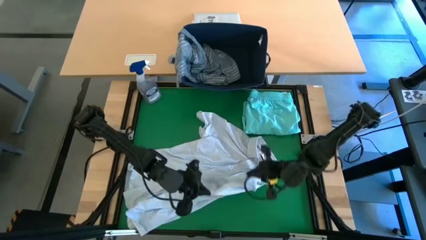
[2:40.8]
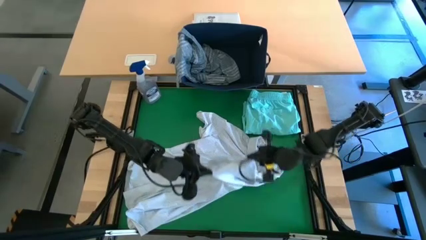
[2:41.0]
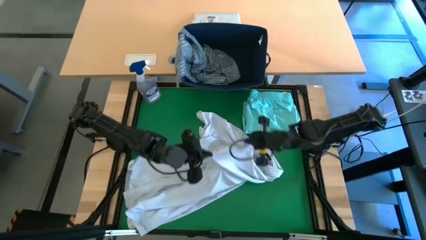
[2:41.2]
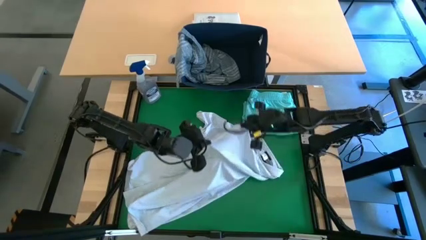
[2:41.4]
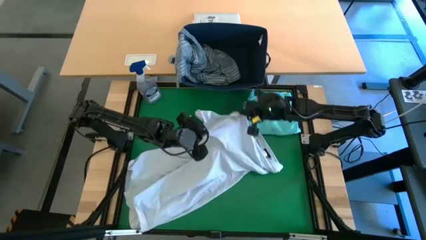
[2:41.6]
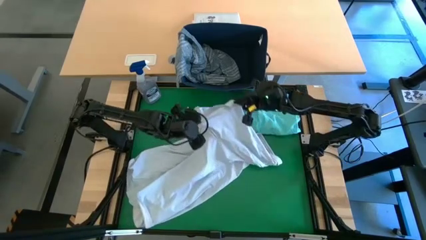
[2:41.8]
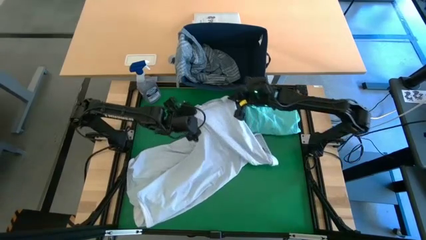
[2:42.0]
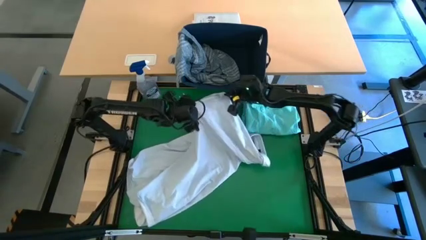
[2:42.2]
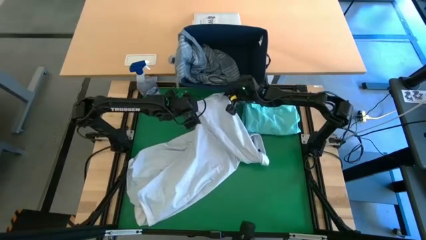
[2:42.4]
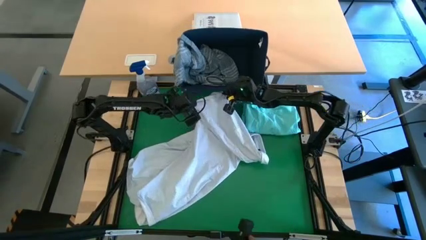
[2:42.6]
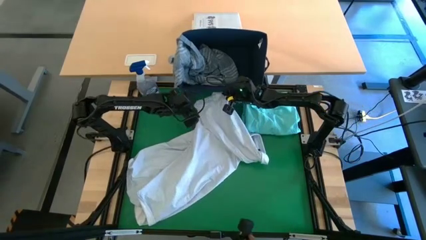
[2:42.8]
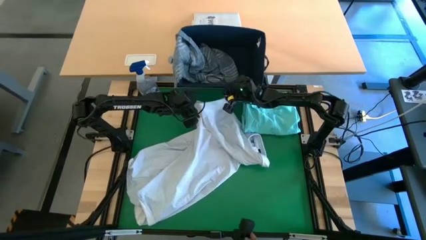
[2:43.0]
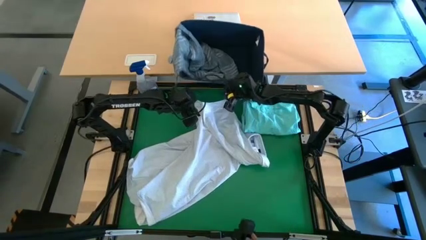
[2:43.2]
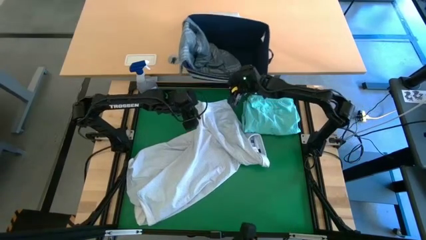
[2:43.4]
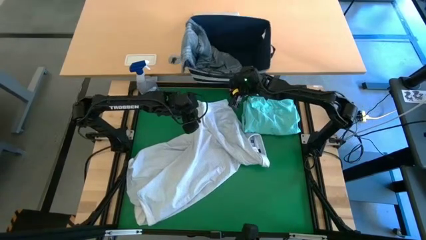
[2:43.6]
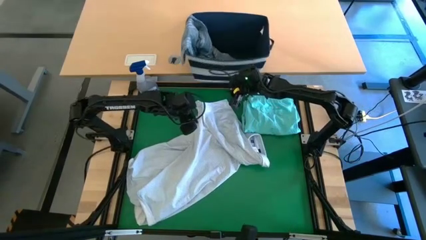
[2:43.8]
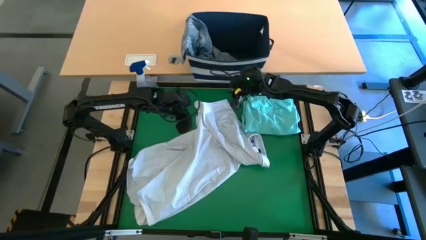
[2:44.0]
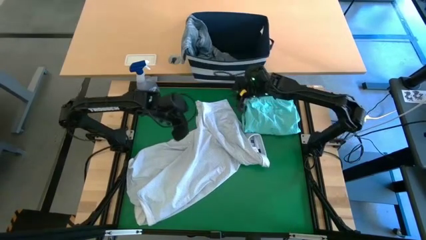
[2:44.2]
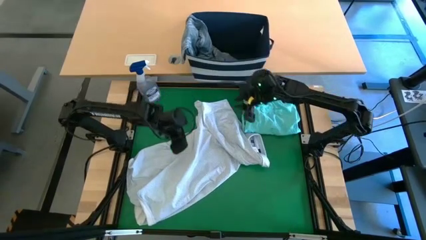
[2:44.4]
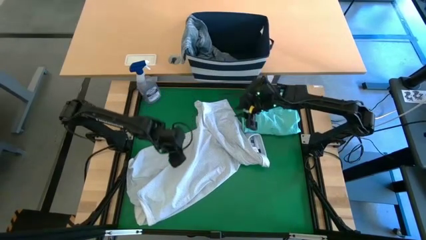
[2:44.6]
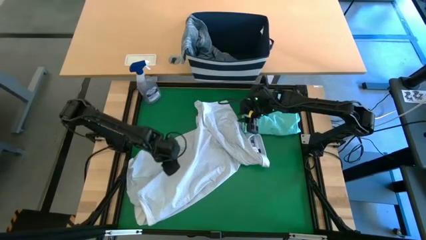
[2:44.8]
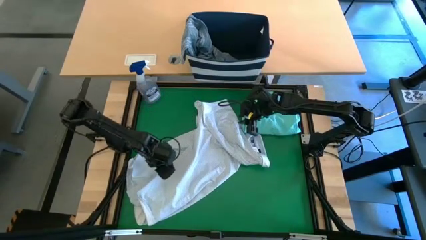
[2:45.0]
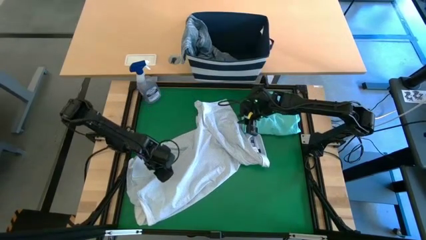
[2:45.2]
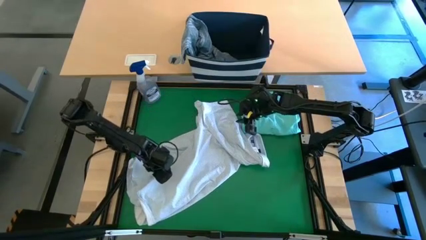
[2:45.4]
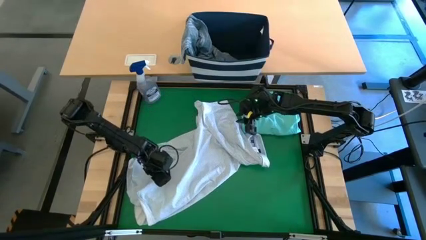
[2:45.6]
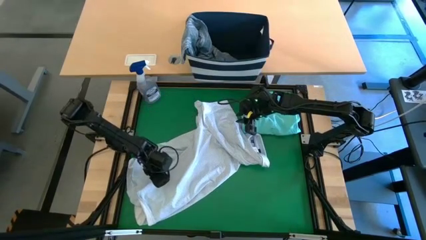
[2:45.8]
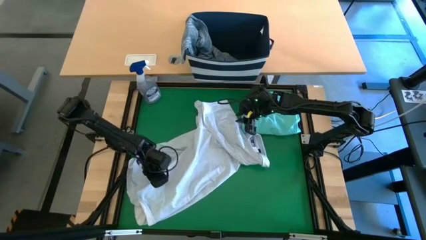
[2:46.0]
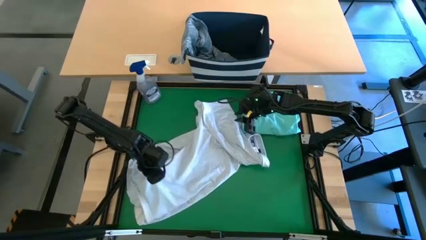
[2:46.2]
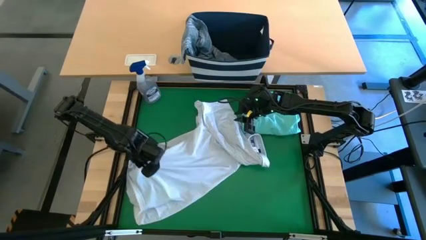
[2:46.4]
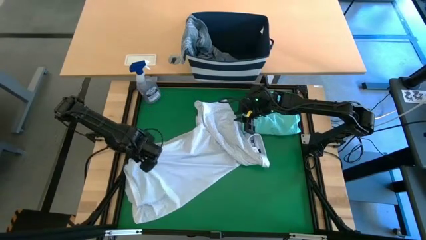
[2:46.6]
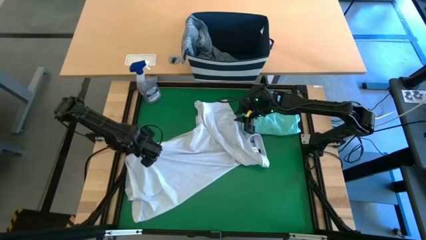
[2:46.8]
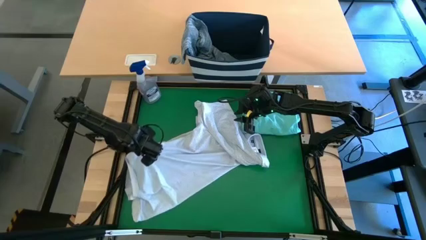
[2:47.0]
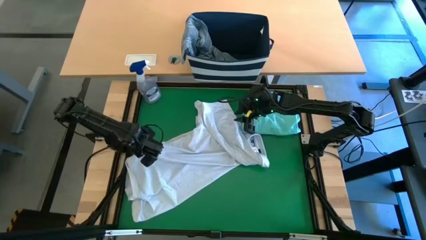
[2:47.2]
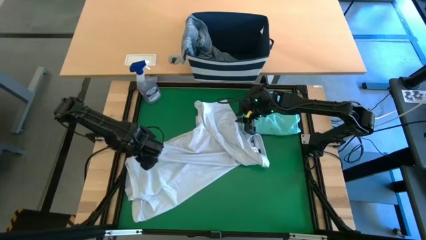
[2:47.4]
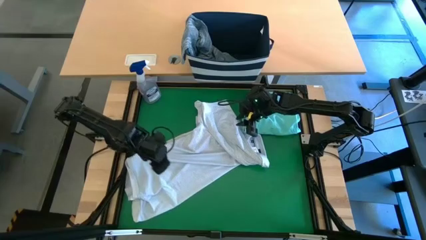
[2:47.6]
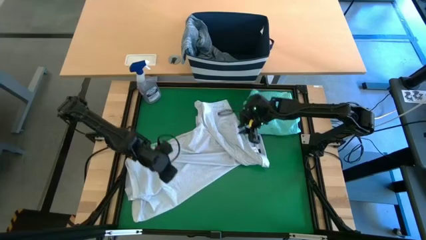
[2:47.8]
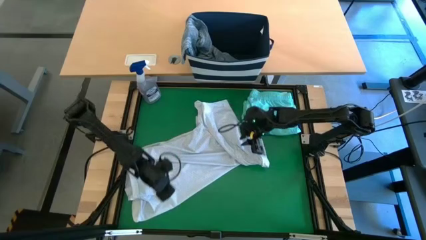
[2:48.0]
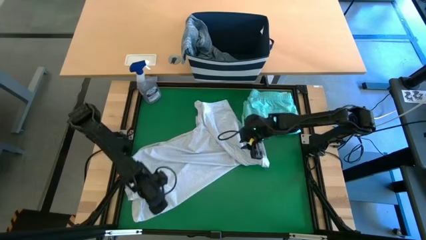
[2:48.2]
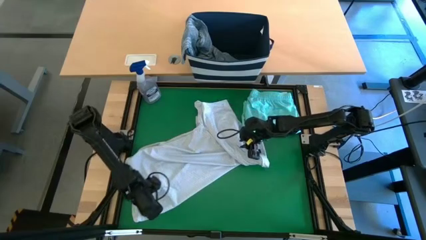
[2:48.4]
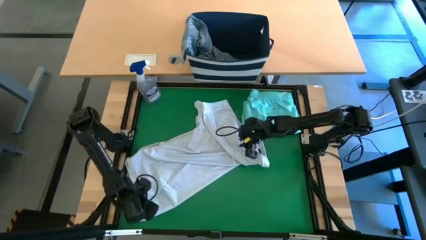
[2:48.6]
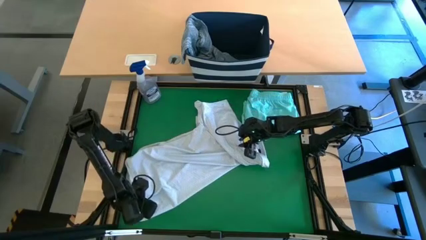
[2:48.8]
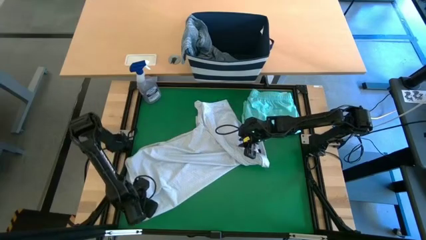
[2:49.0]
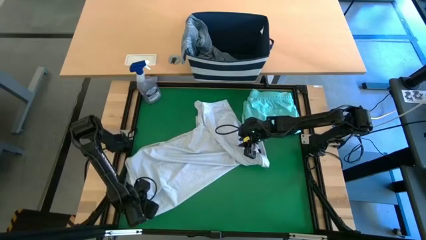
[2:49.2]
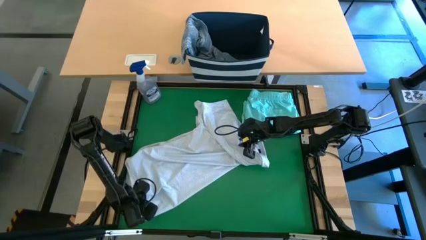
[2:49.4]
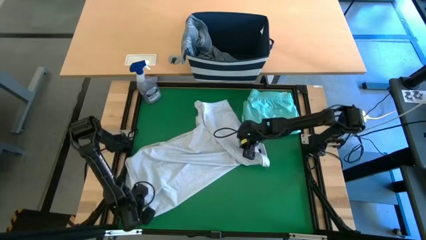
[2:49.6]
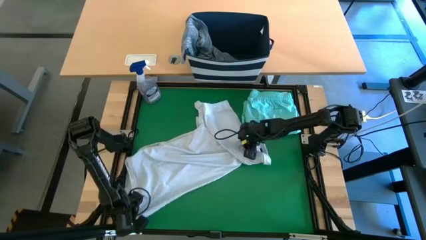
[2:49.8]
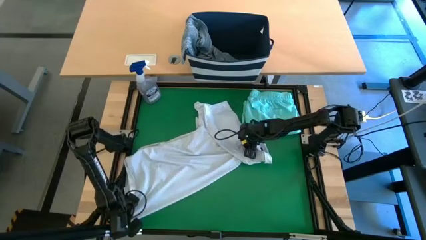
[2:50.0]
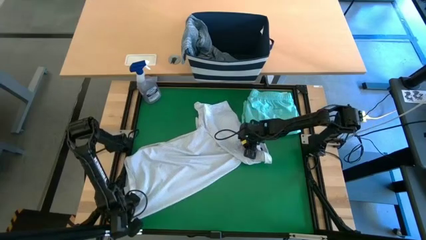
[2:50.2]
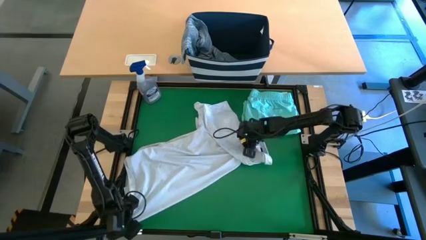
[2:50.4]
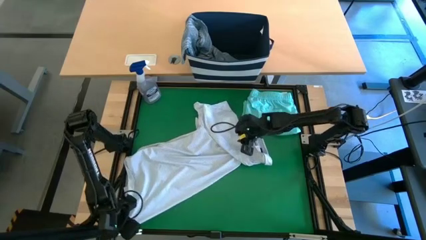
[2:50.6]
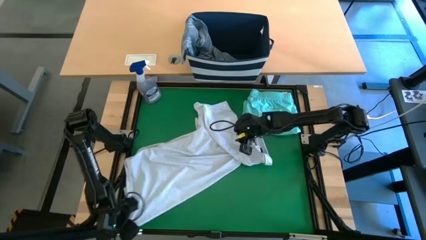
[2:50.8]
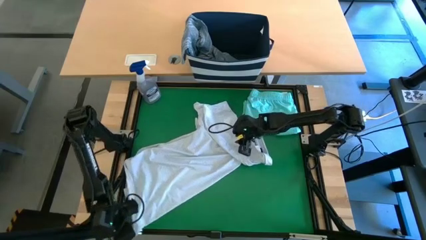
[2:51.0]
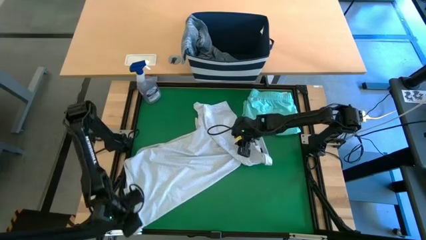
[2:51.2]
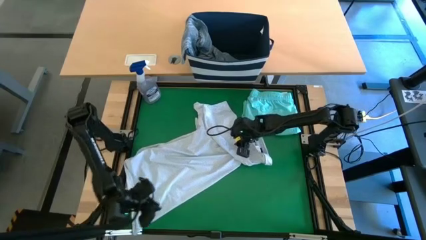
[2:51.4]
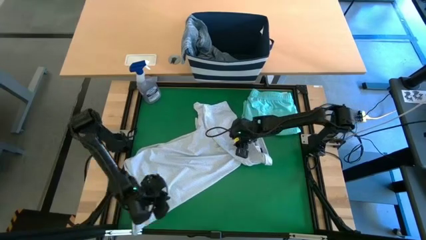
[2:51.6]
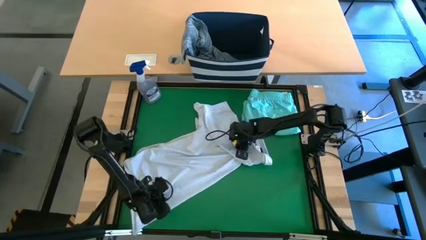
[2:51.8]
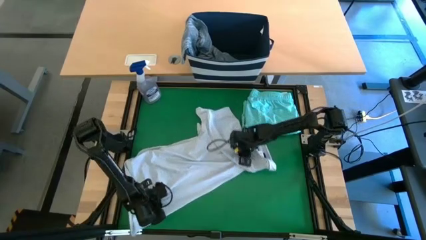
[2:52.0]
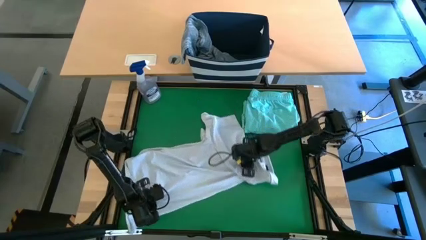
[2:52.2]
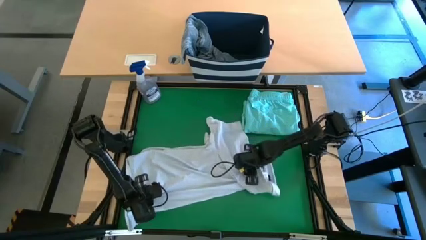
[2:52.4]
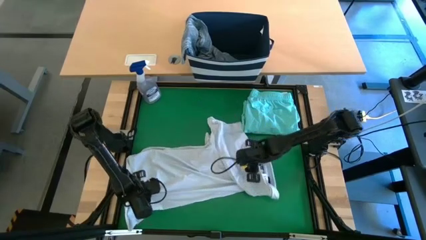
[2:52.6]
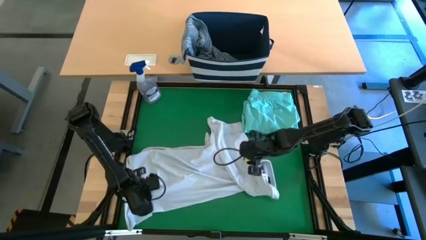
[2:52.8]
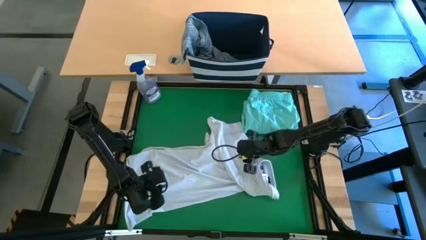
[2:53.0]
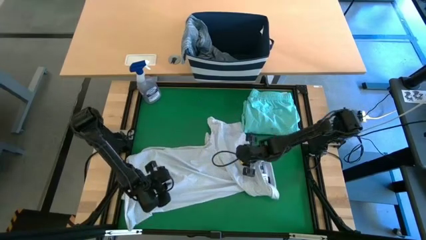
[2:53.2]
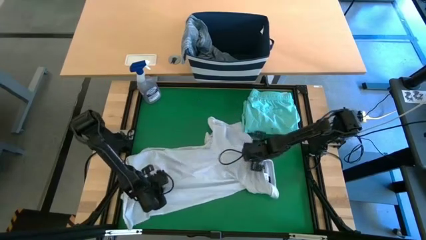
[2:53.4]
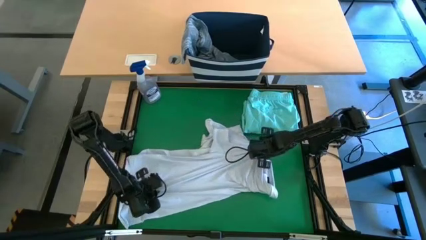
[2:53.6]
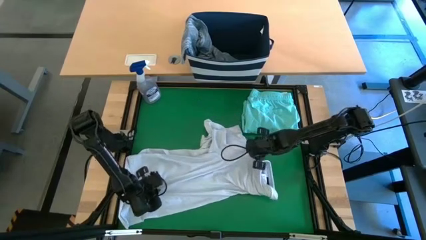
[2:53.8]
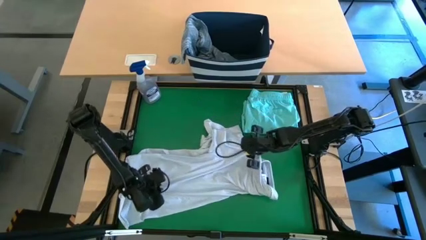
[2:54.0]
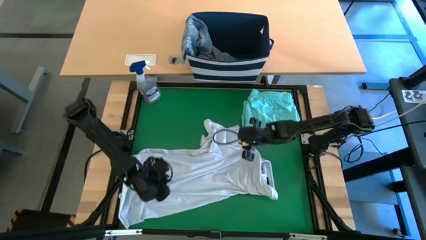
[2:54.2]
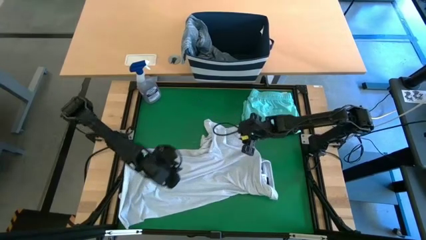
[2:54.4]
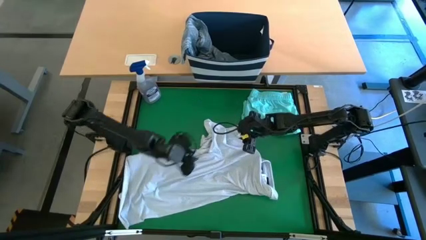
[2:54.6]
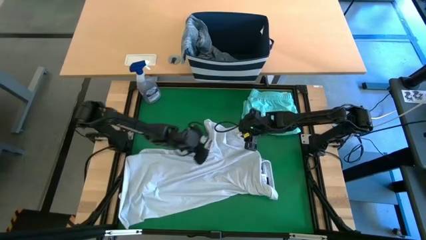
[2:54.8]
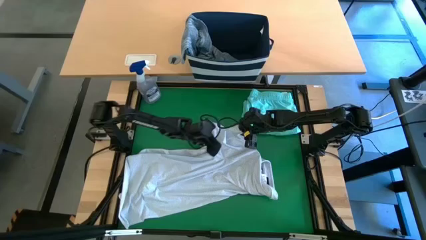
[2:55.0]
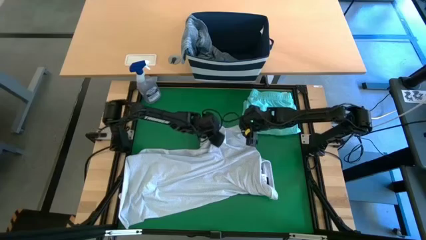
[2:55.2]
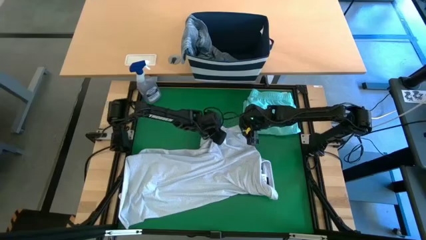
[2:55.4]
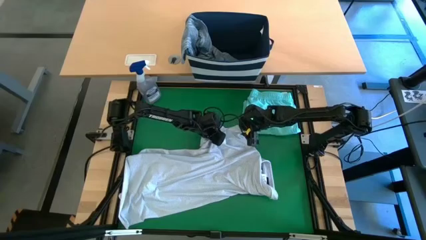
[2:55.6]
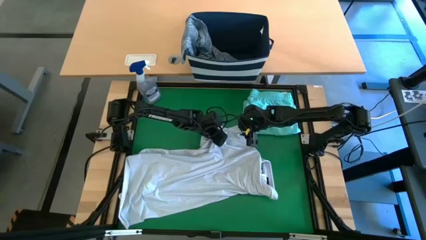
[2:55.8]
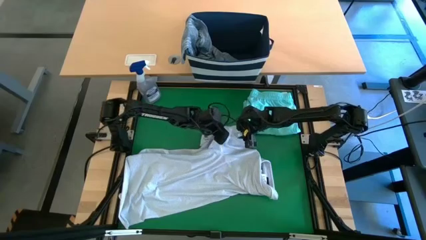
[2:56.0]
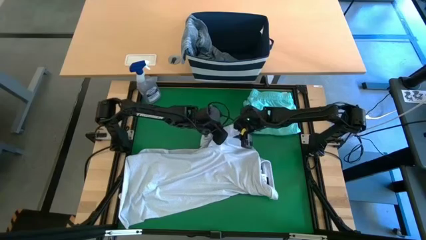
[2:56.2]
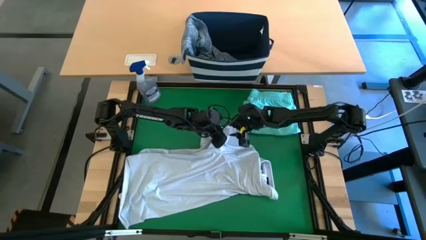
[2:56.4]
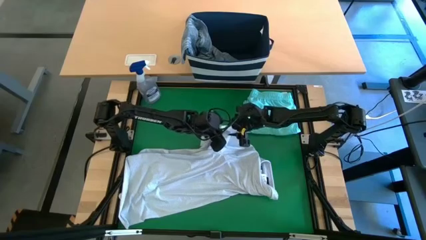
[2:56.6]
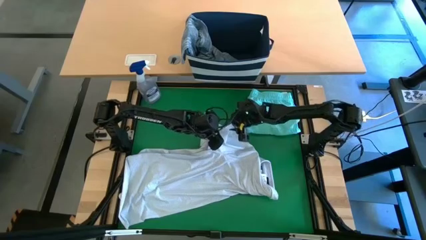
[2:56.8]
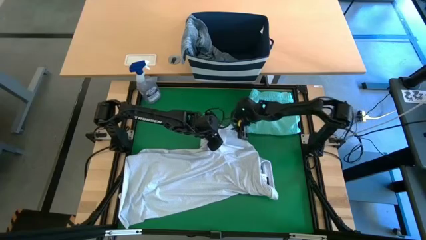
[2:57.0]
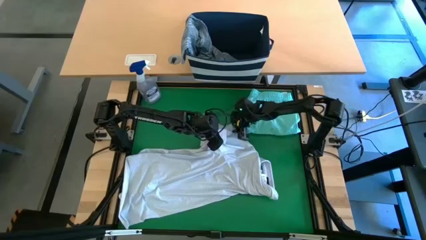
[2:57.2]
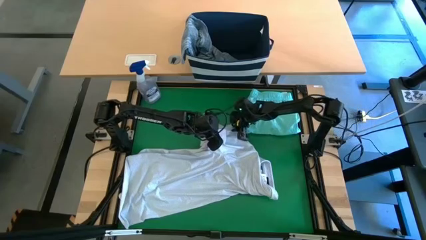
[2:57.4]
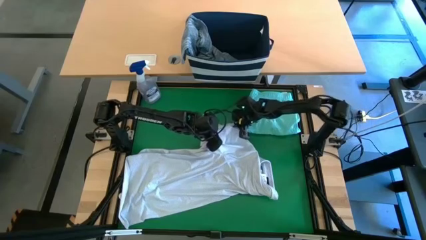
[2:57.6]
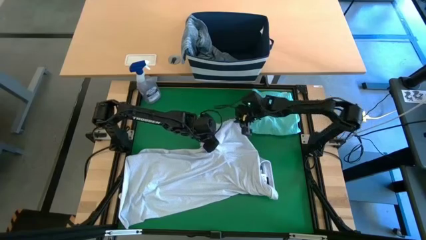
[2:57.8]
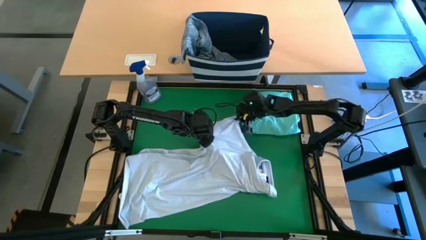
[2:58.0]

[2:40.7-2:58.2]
Task: Fold laundry
Fold the white polo shirt
